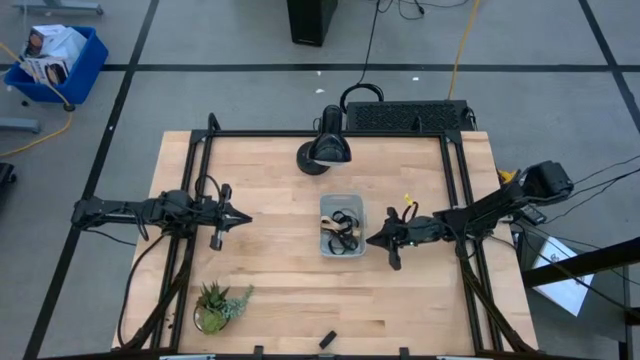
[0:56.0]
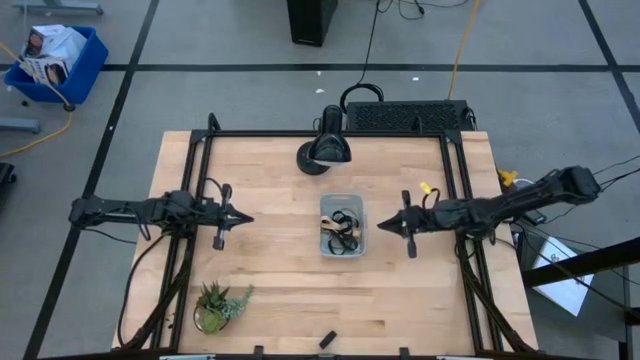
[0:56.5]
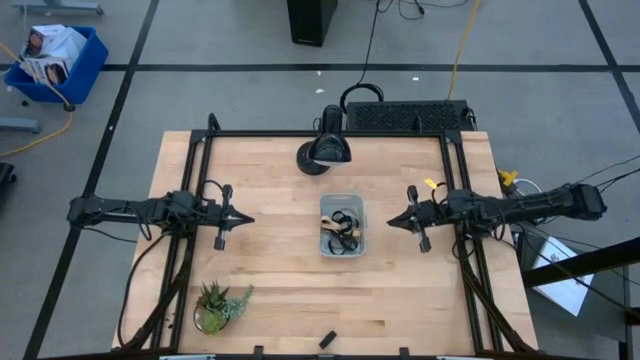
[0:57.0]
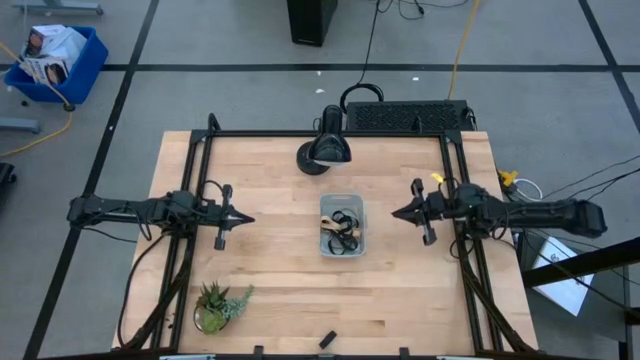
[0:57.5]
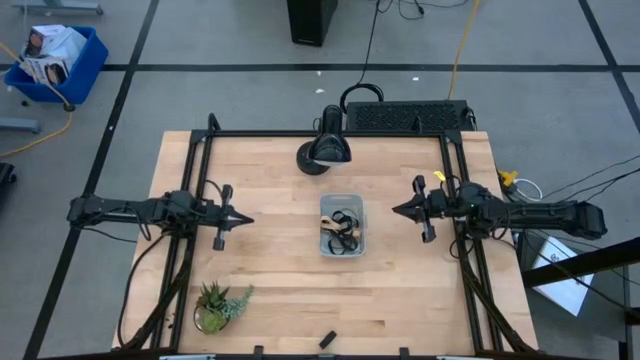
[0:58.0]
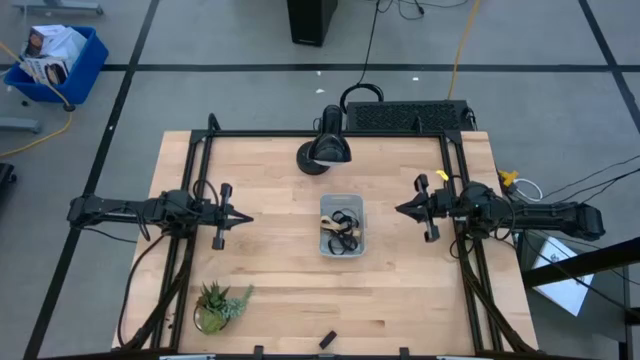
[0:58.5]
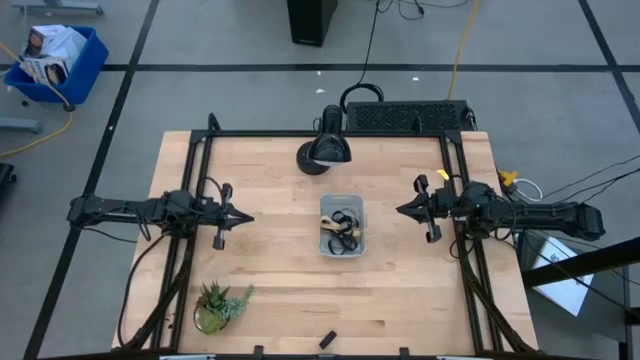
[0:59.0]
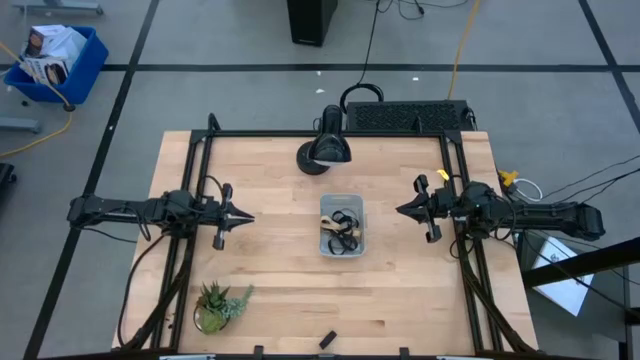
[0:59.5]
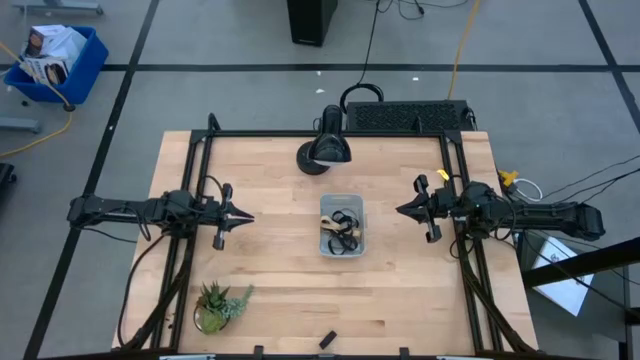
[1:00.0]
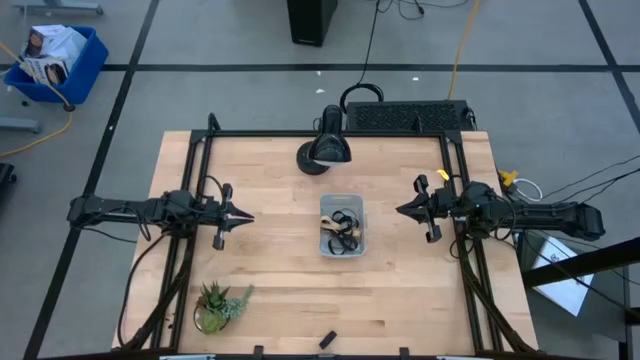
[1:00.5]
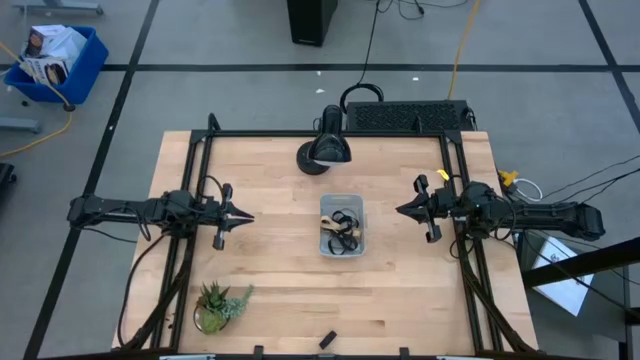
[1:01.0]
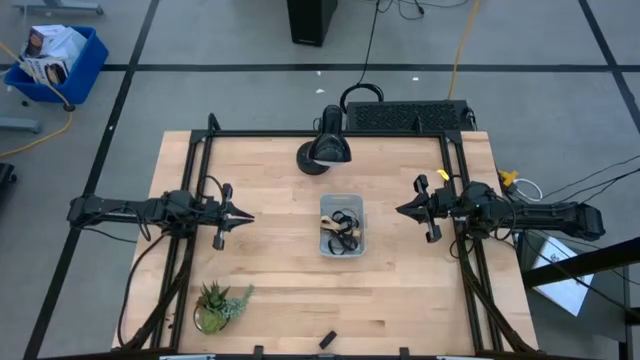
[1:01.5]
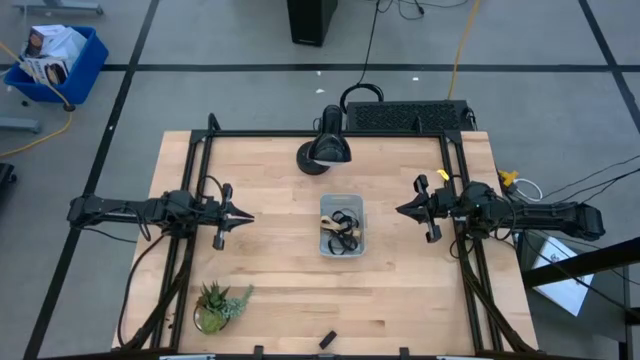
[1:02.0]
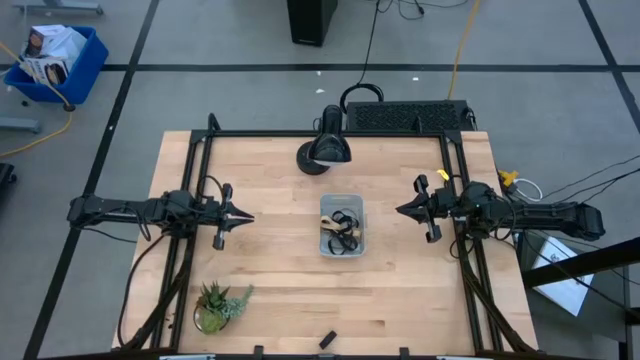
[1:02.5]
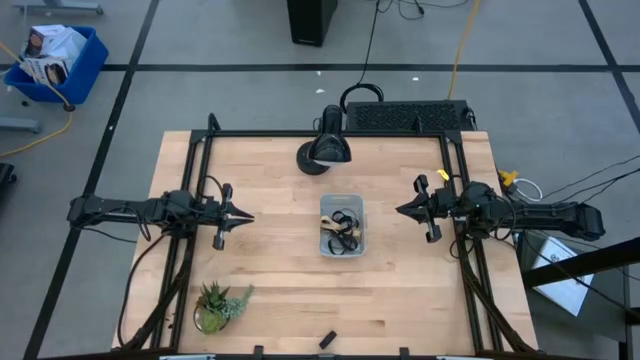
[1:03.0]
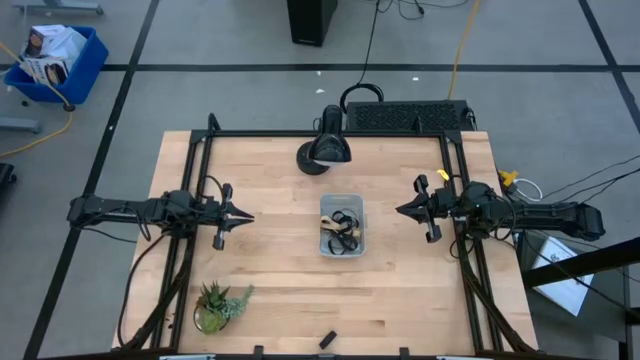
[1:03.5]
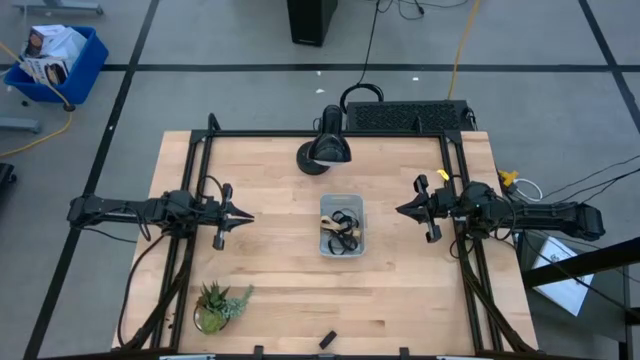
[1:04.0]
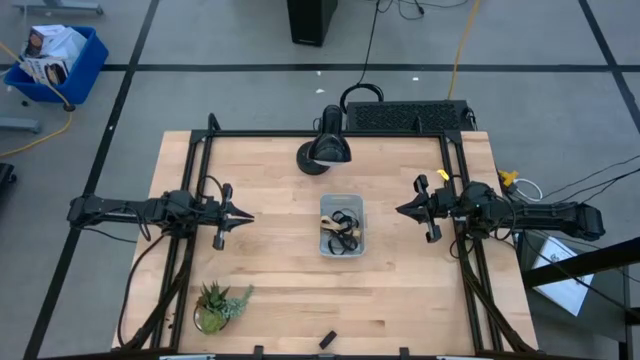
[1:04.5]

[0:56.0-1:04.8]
Task: Pick and place rubber bands into bin
Return to home position

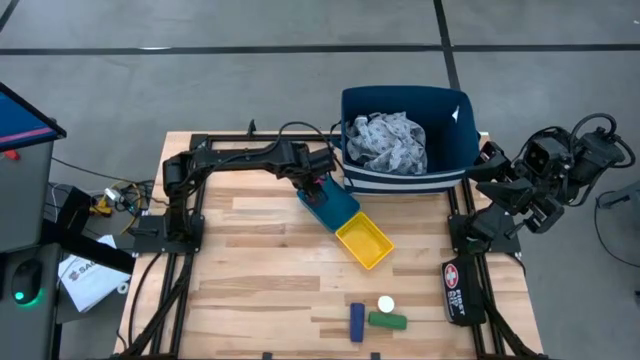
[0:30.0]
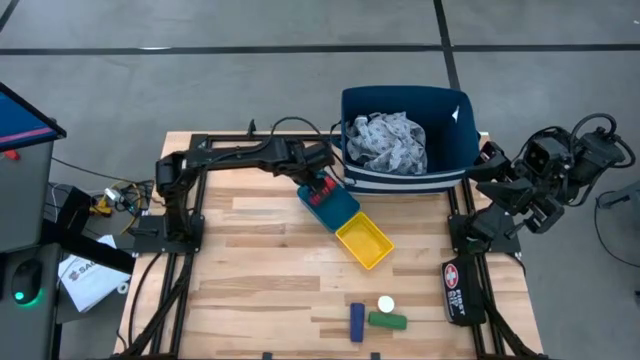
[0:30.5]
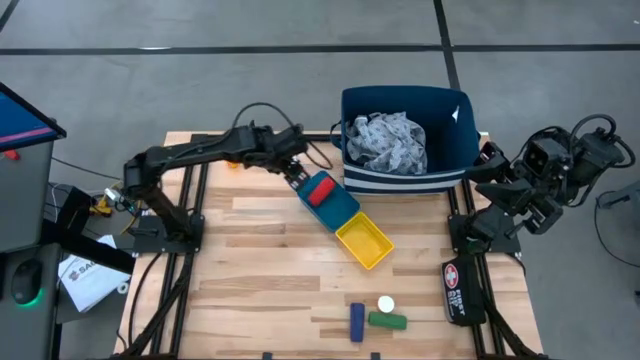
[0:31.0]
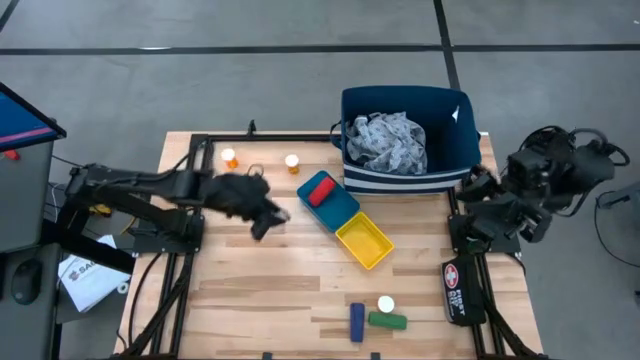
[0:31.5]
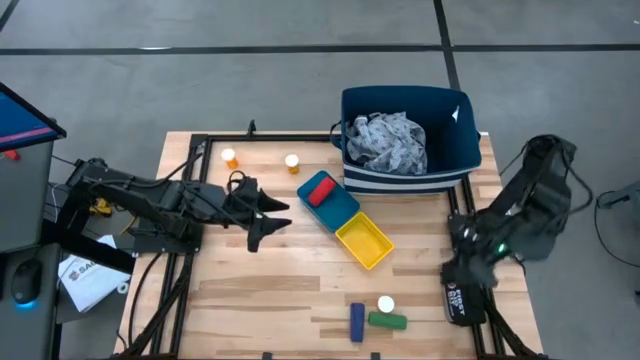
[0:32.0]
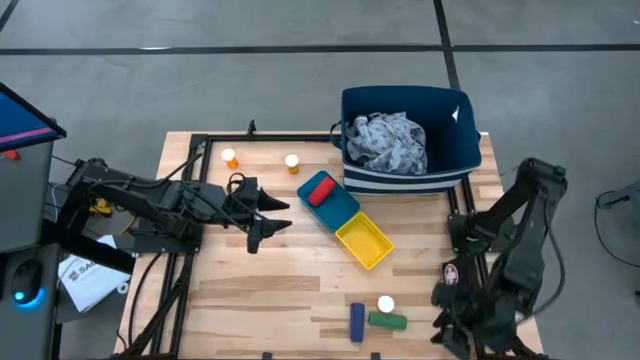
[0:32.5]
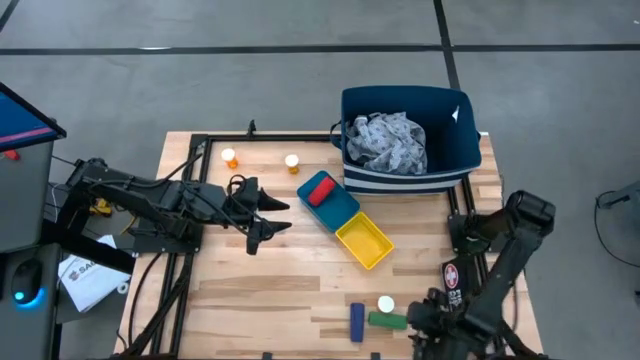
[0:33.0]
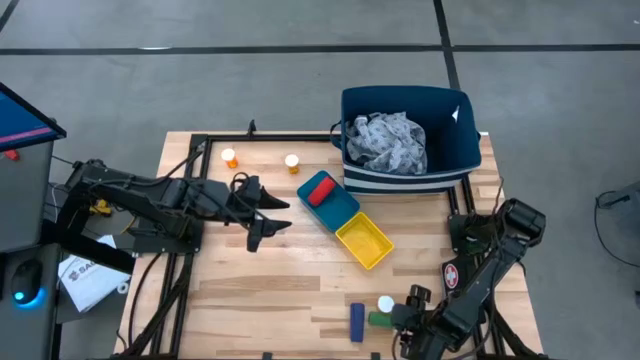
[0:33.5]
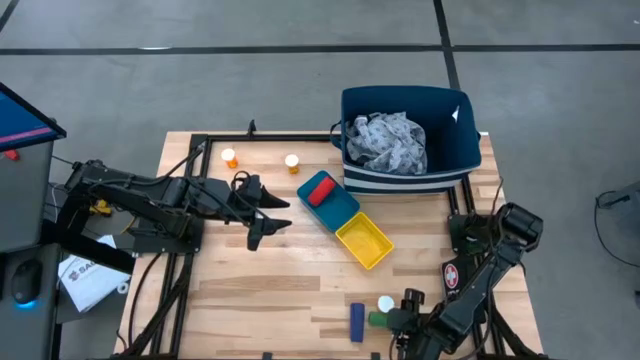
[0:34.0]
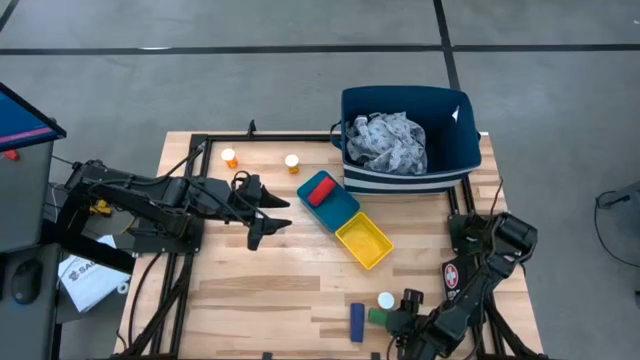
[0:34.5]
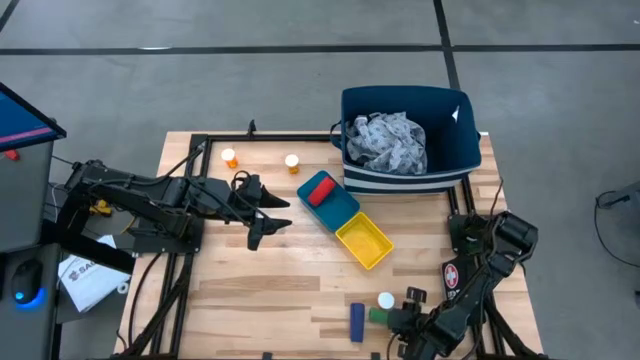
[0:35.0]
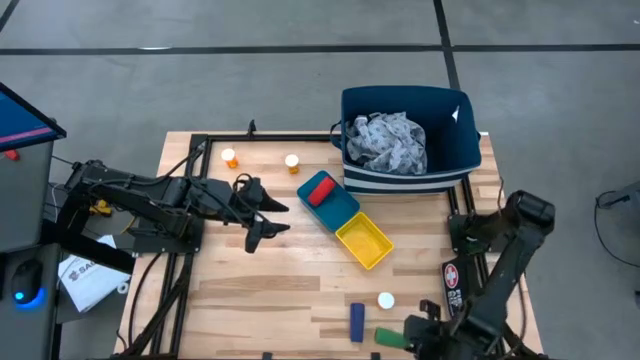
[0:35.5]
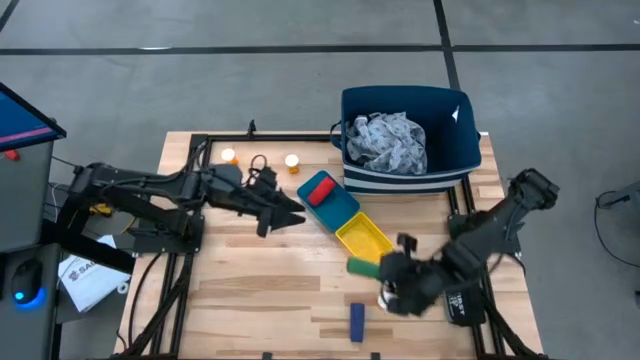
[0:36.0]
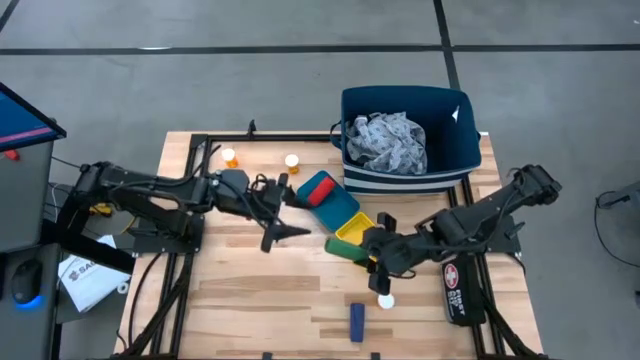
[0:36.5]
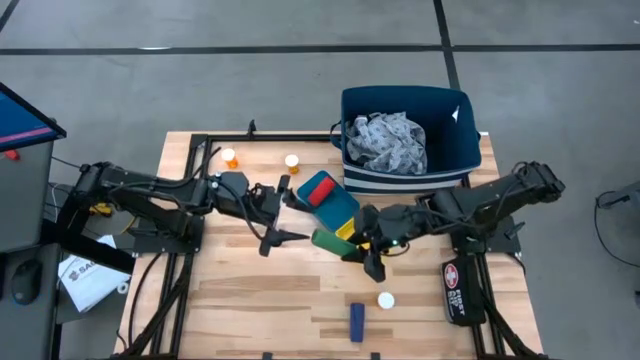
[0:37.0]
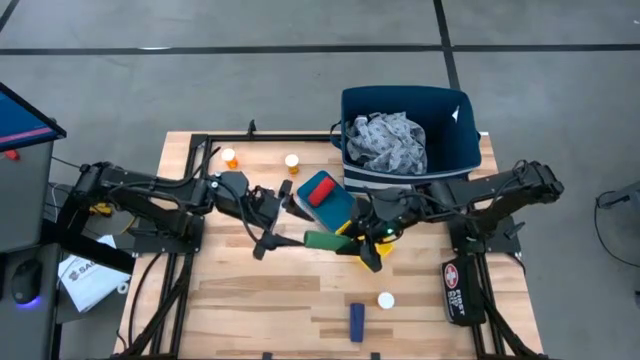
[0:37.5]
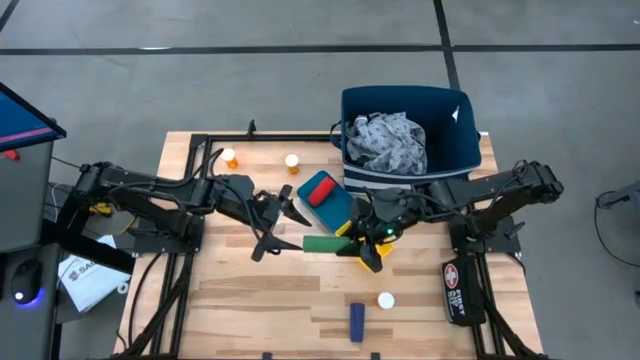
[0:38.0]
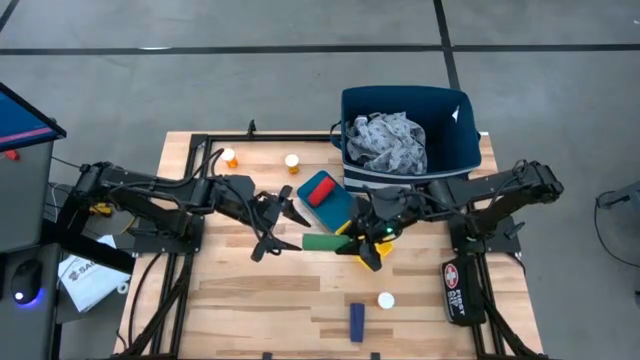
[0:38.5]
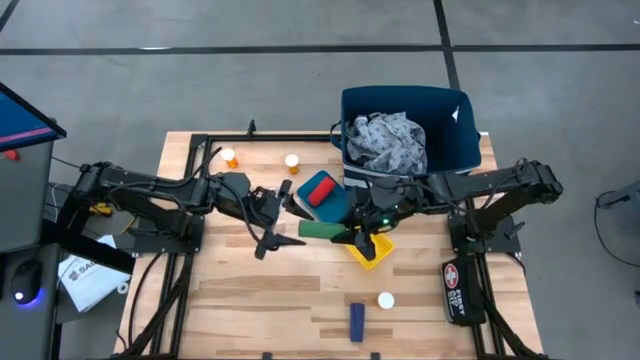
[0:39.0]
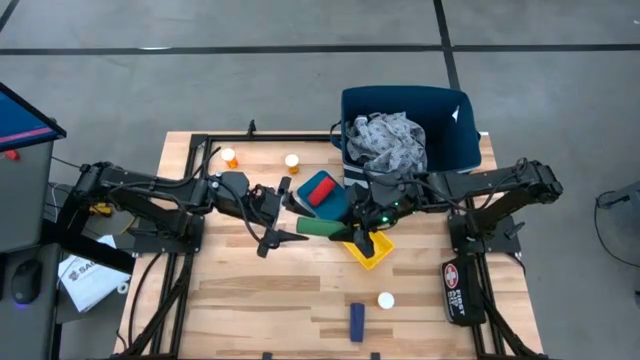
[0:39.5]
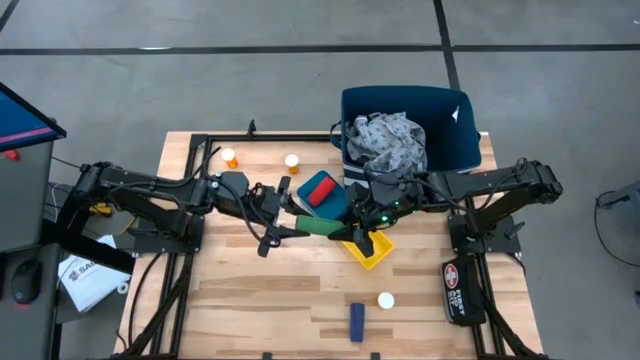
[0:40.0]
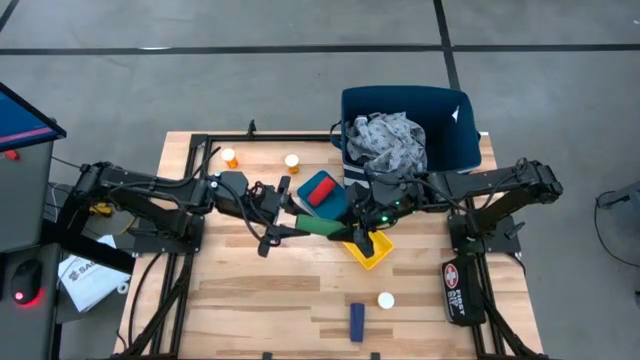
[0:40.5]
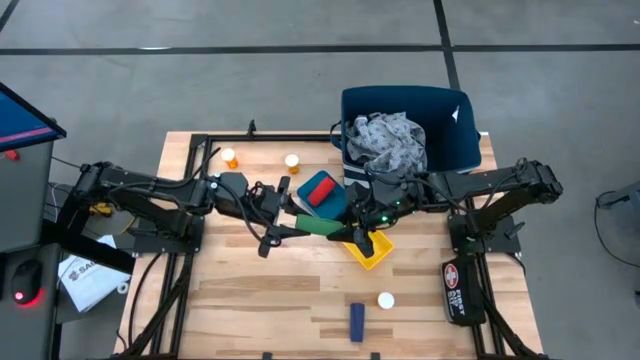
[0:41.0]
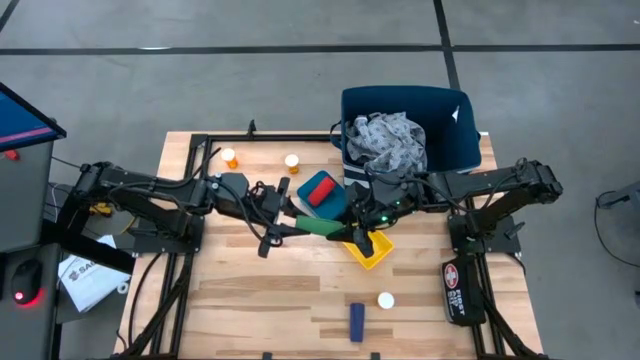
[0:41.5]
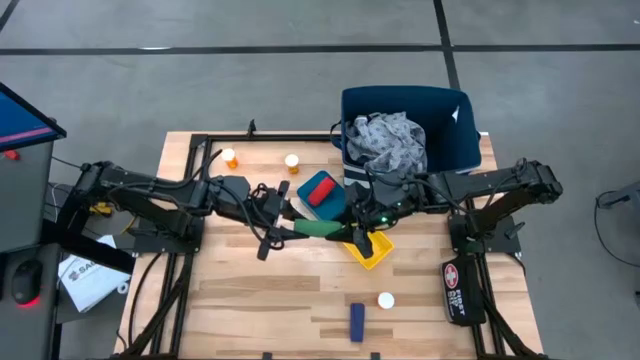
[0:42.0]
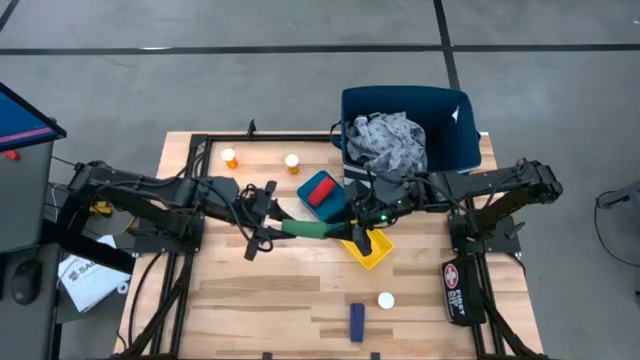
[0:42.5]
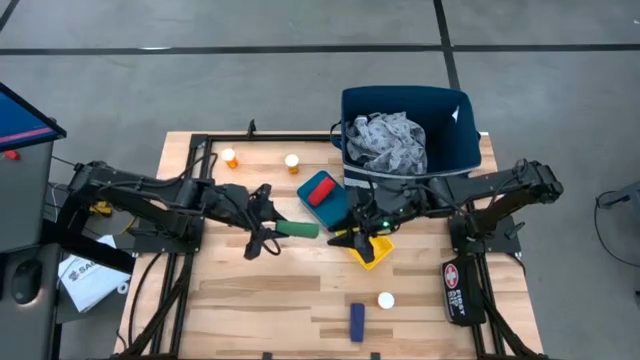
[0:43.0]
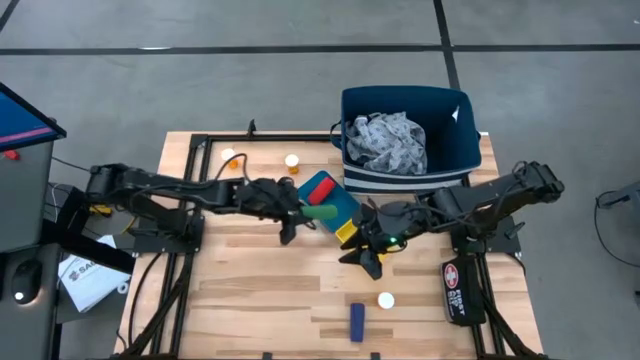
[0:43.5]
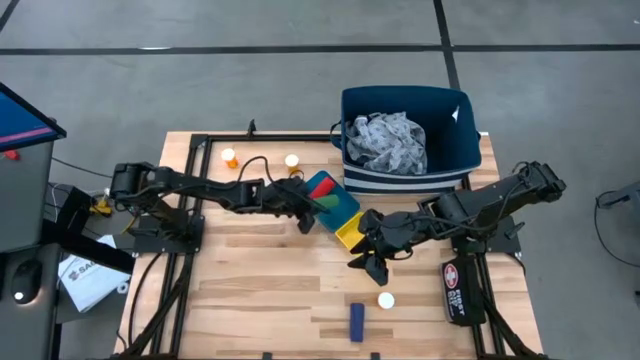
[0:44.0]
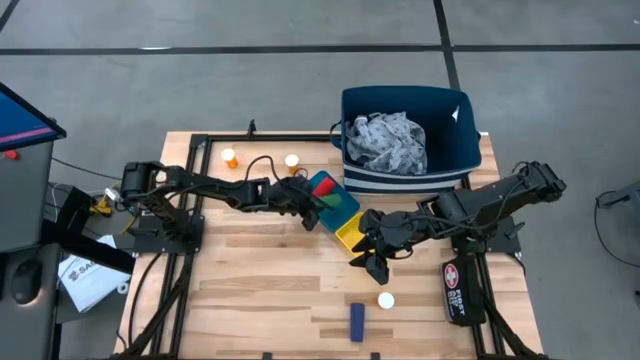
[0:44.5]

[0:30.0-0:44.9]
Task: Pick & Place Medicine items
Put the green bandage into the blue bin
